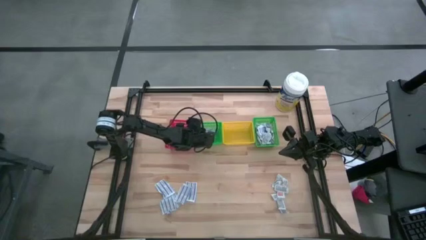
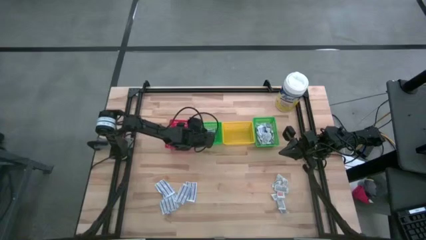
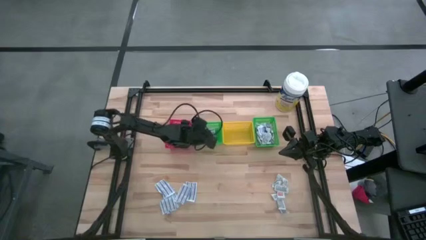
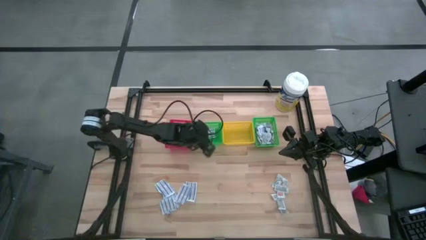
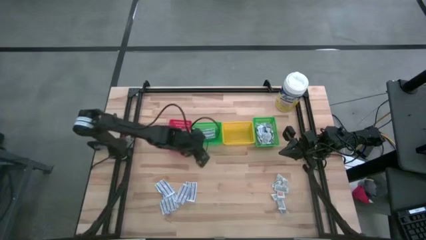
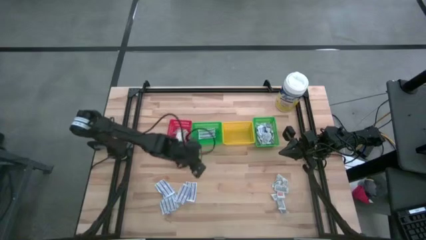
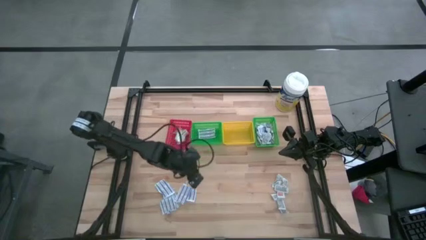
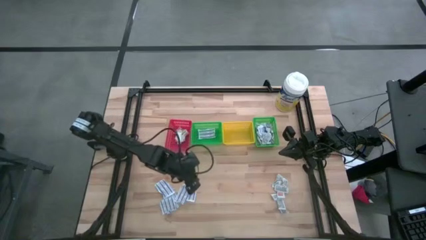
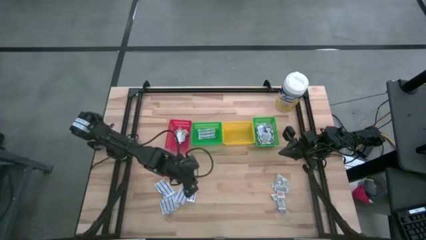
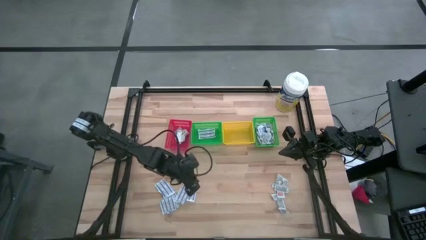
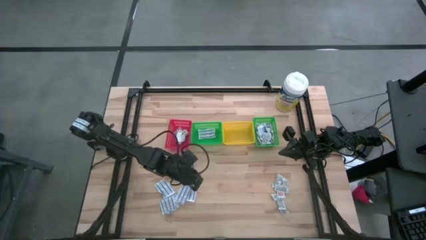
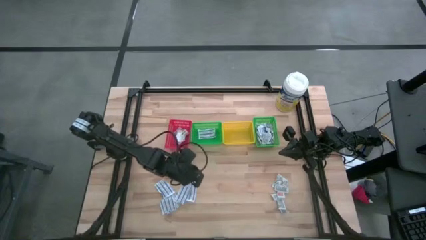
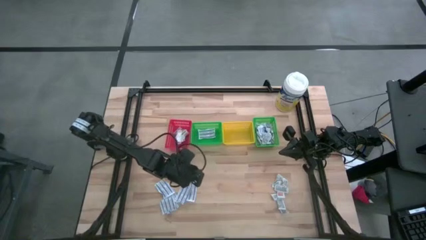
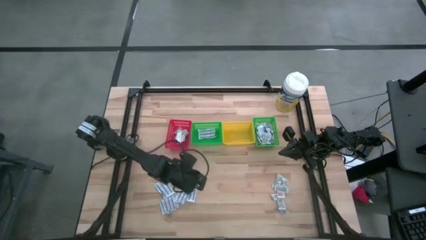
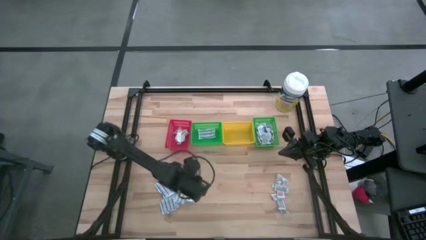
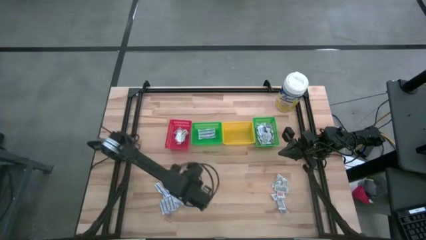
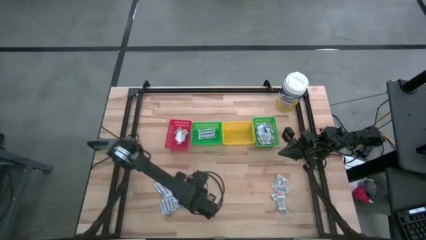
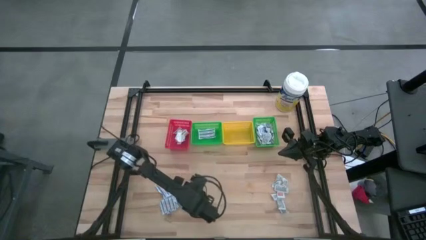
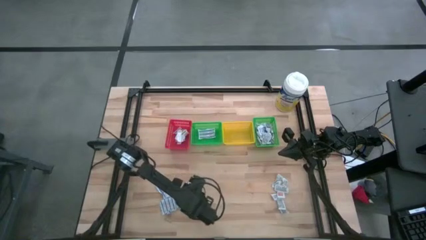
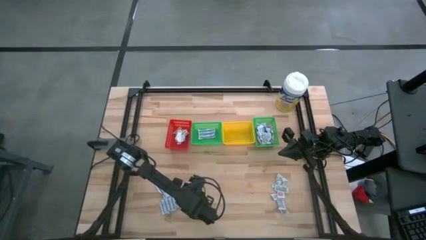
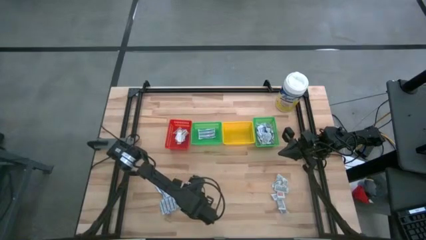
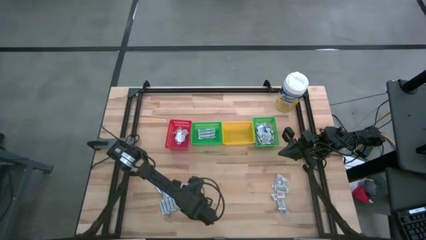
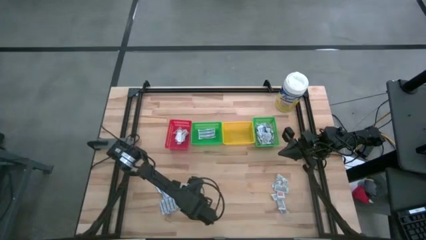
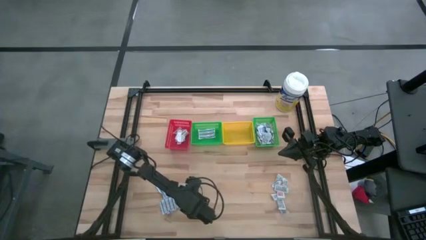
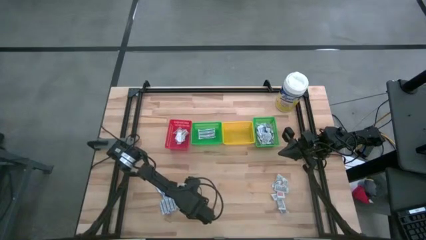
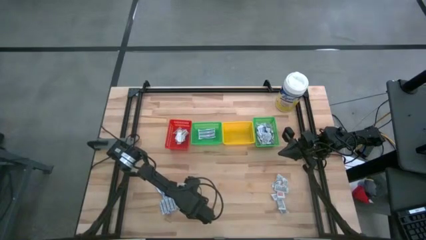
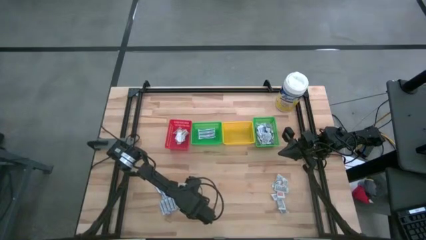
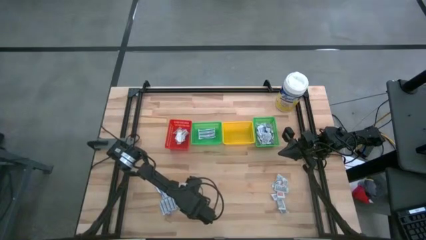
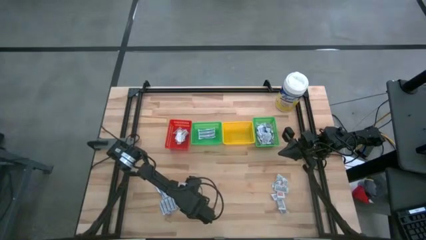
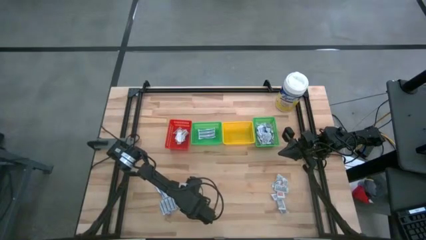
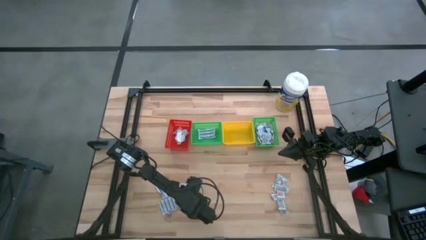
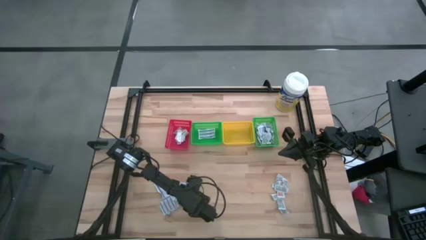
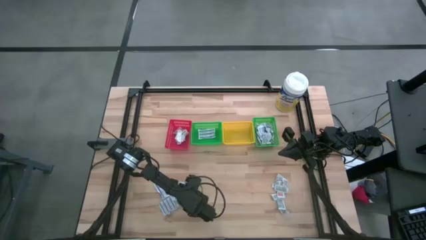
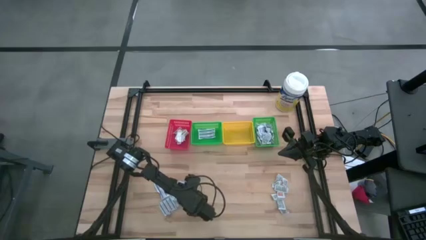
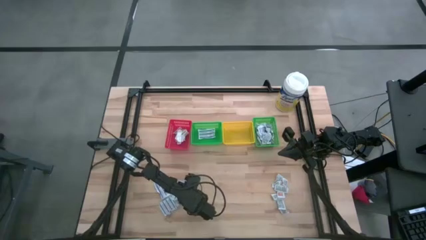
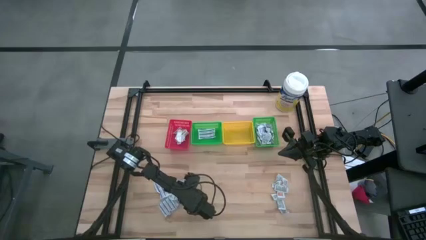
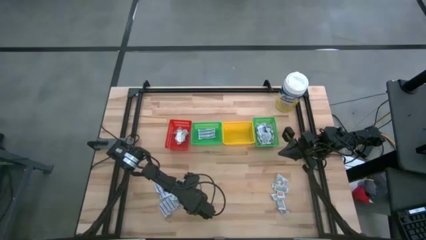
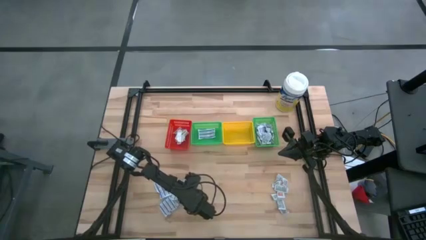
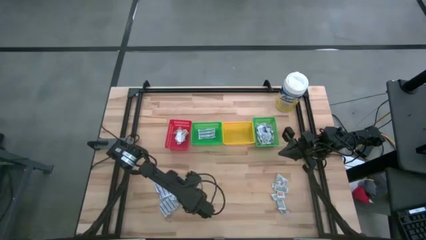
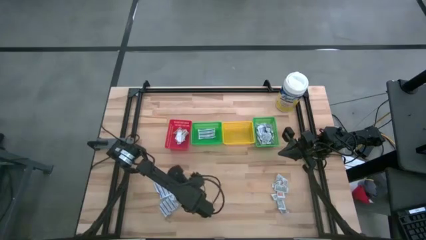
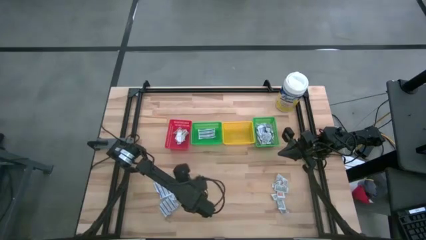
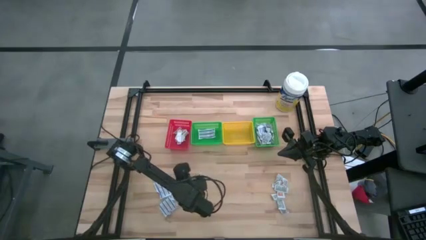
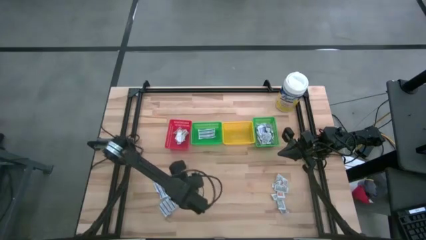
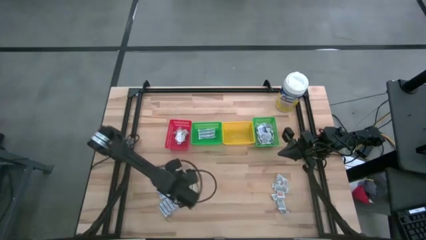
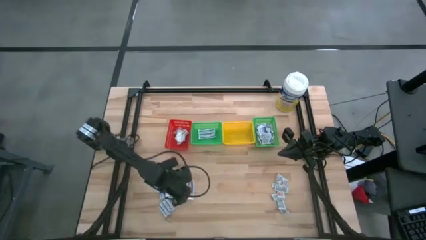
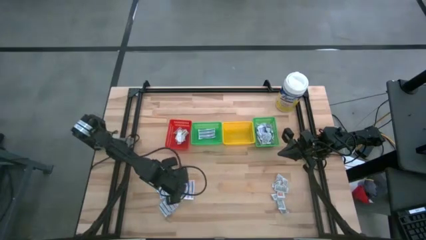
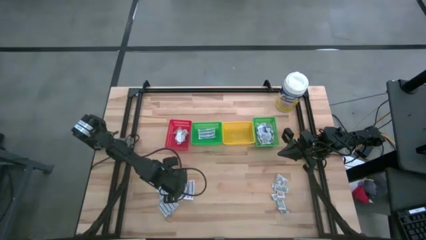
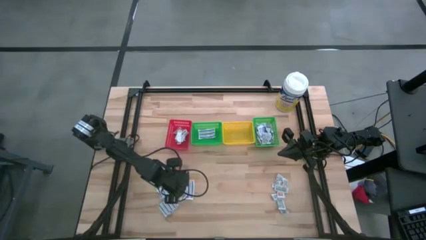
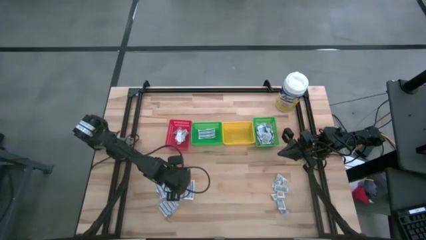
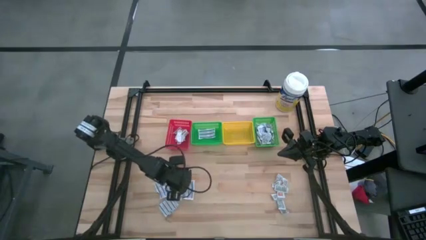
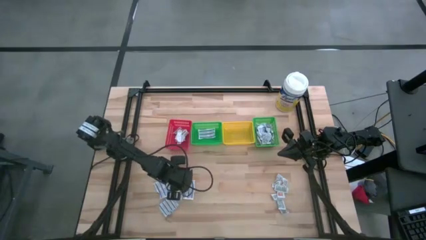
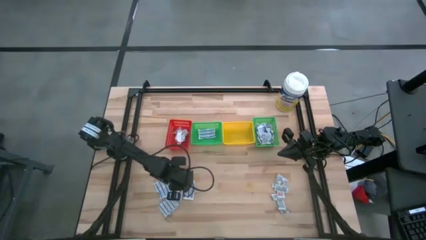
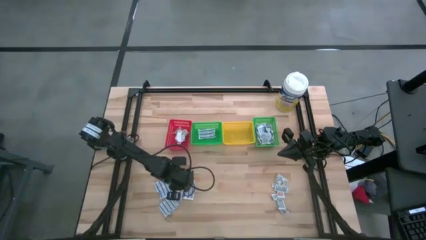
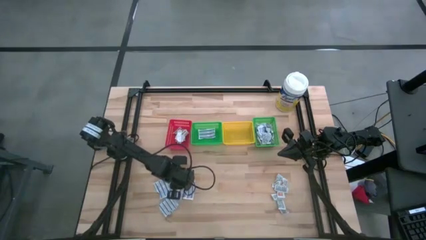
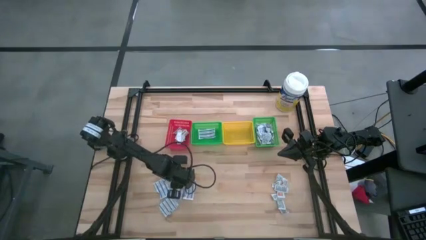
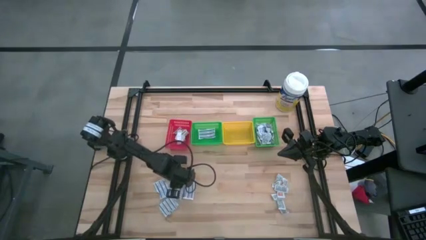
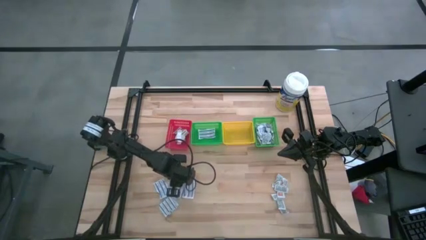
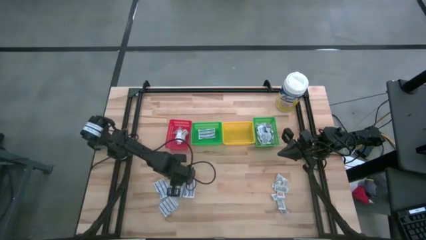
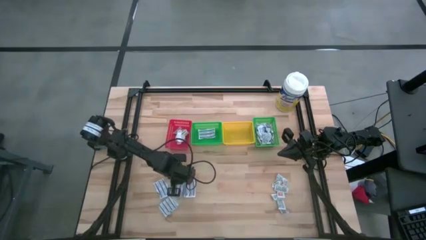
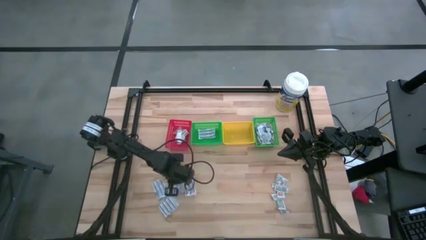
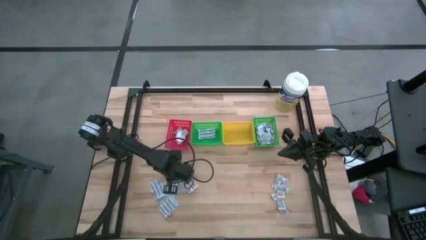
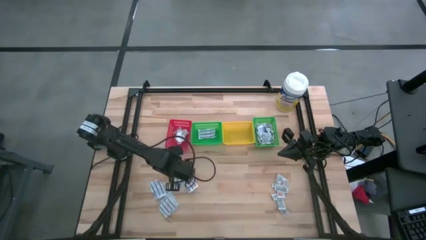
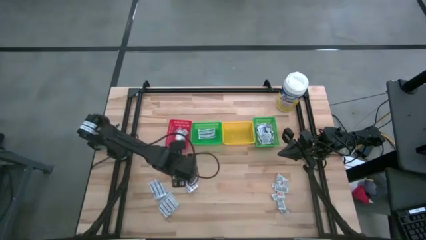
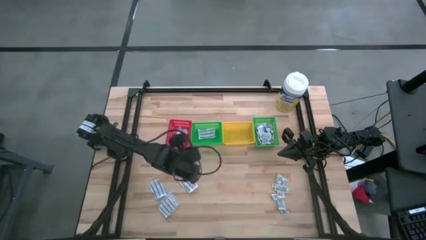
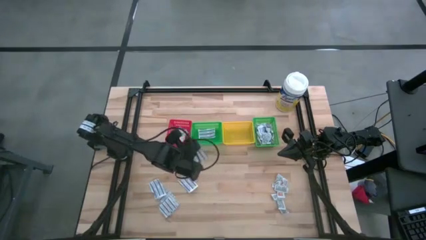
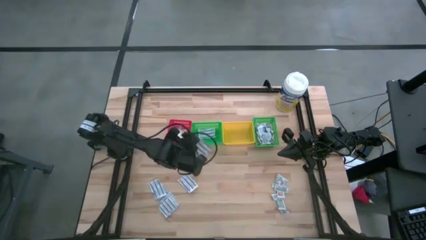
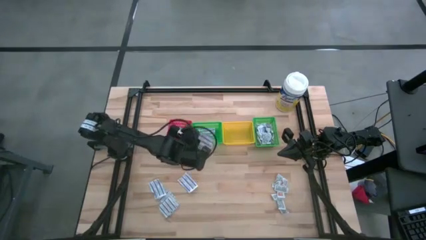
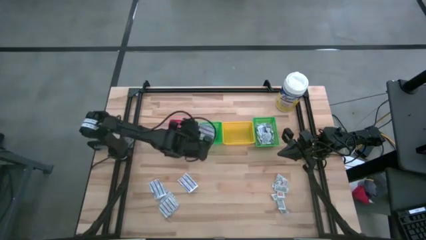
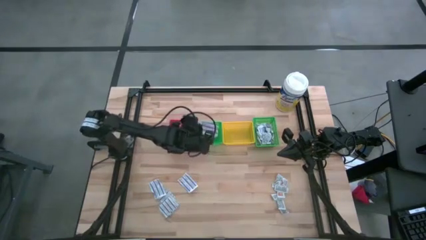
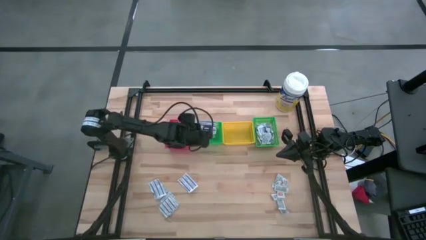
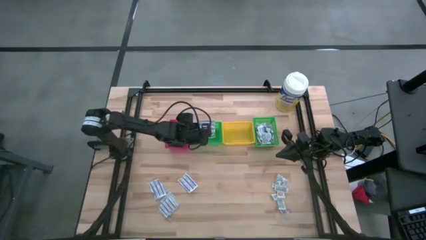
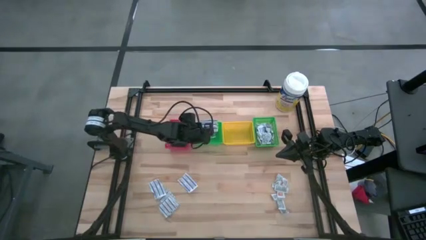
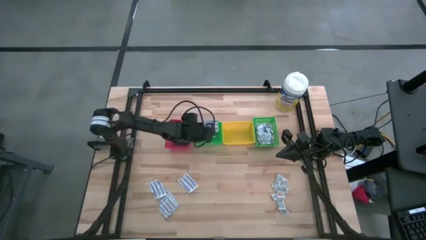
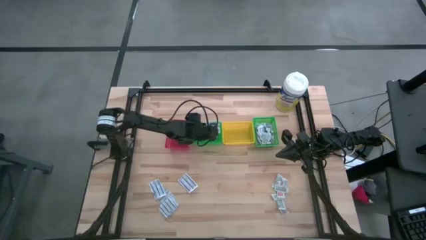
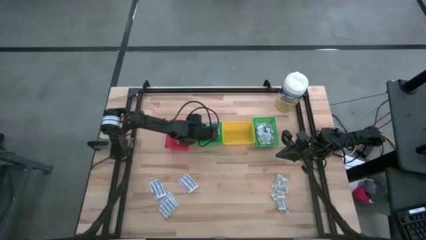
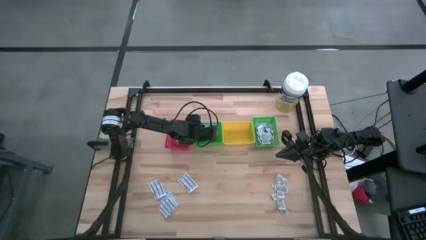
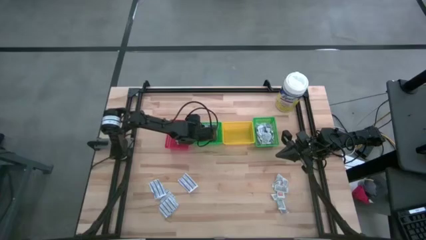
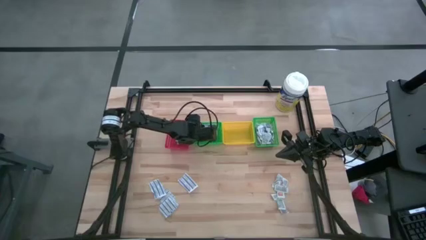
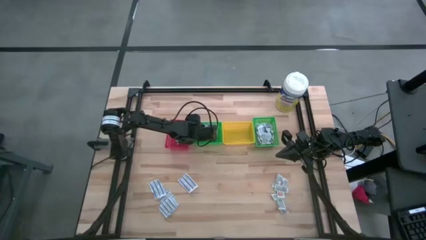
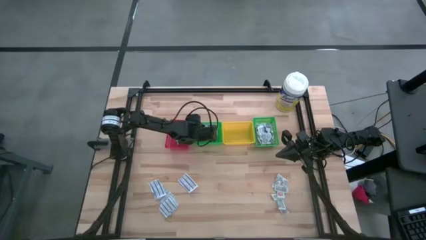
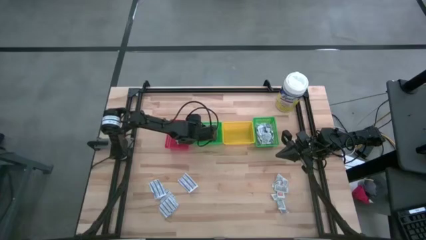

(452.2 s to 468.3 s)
Task: Pick & Place First Aid Supplies
Put the blue bandage into the left green bin
